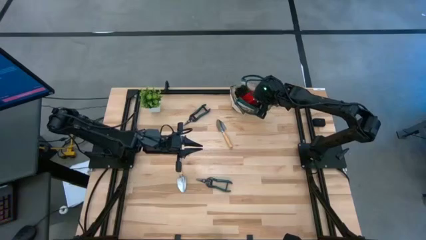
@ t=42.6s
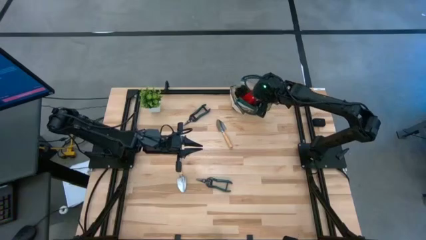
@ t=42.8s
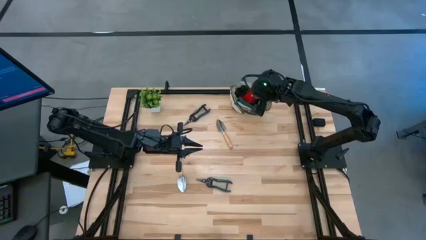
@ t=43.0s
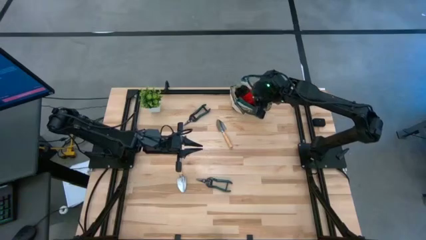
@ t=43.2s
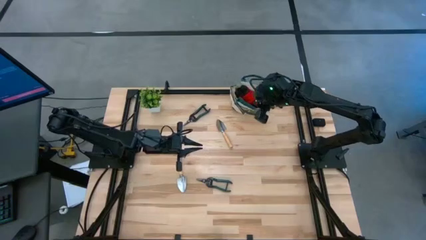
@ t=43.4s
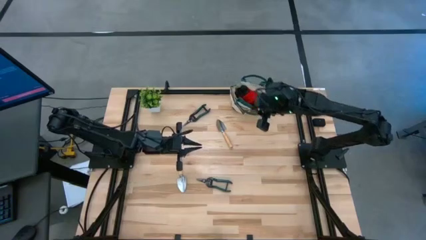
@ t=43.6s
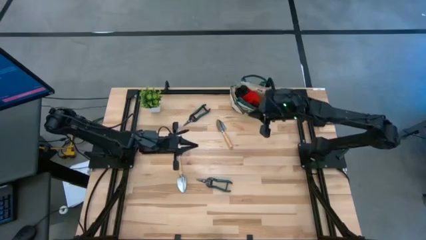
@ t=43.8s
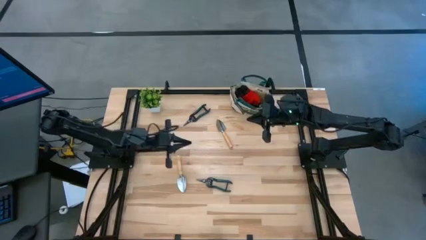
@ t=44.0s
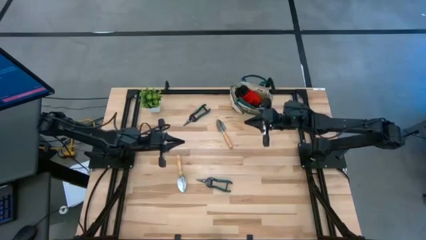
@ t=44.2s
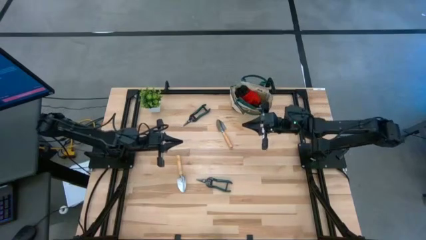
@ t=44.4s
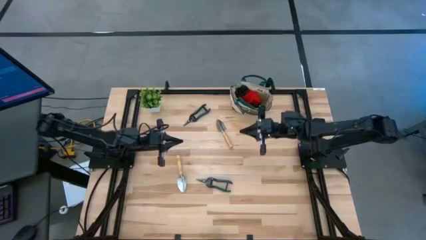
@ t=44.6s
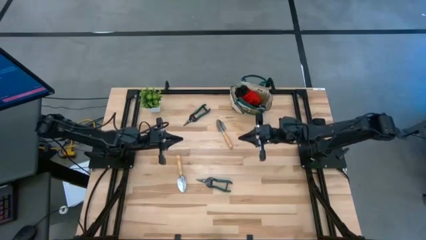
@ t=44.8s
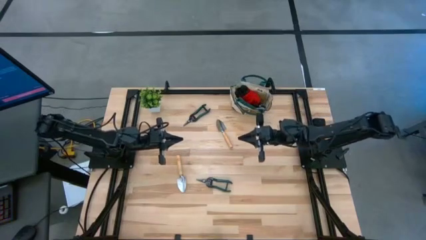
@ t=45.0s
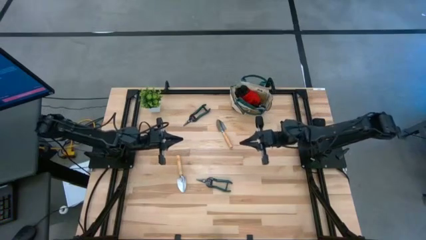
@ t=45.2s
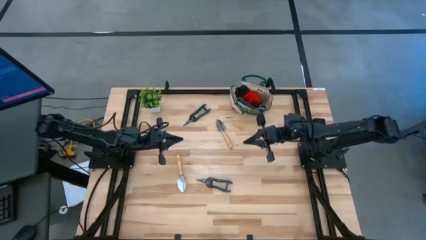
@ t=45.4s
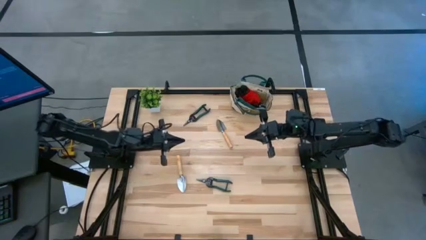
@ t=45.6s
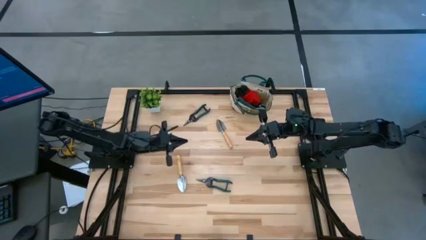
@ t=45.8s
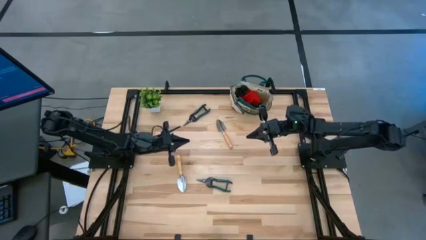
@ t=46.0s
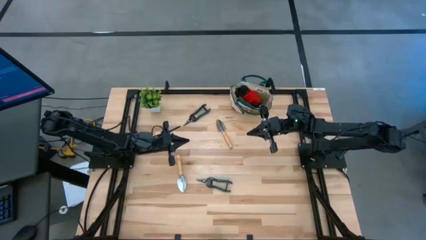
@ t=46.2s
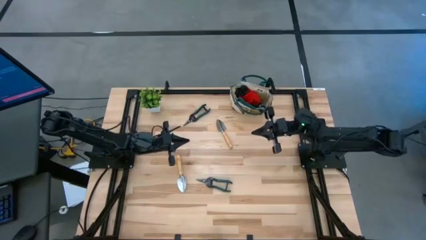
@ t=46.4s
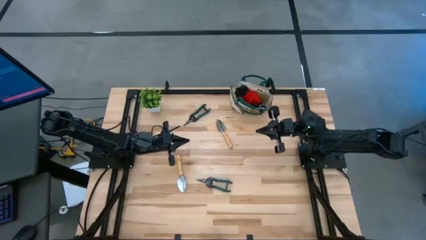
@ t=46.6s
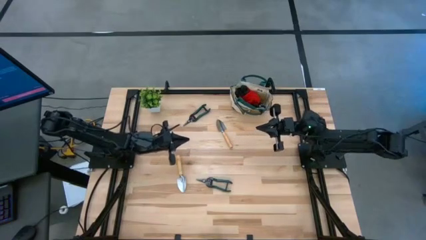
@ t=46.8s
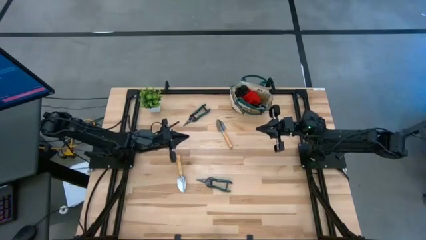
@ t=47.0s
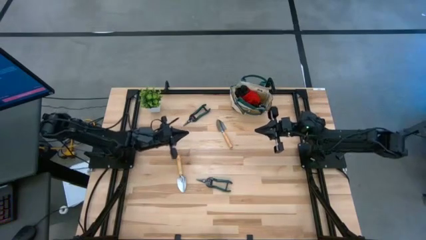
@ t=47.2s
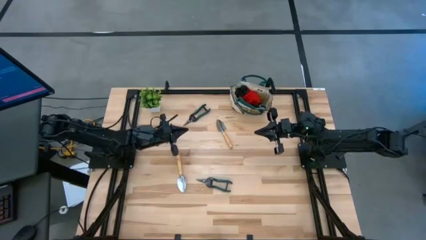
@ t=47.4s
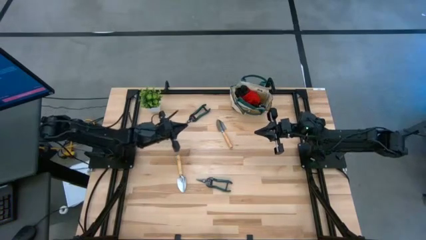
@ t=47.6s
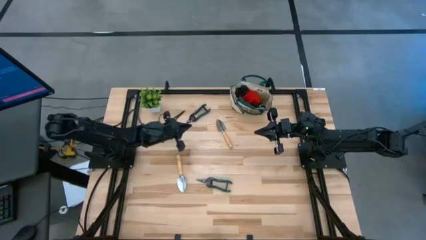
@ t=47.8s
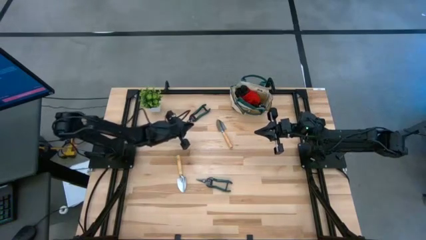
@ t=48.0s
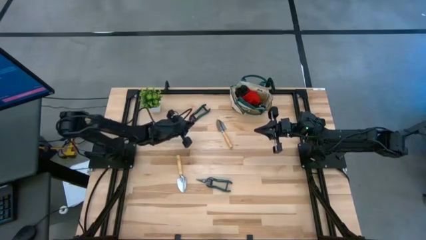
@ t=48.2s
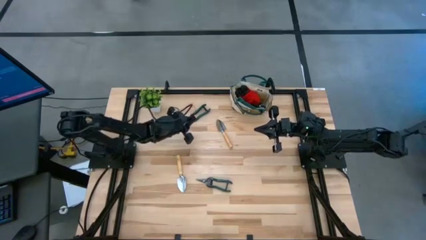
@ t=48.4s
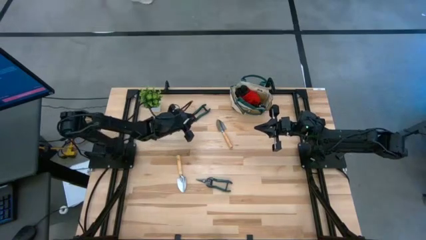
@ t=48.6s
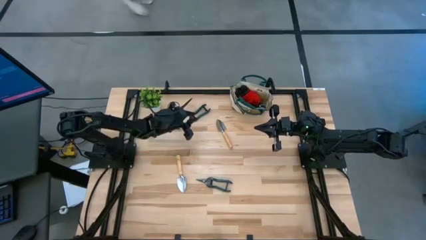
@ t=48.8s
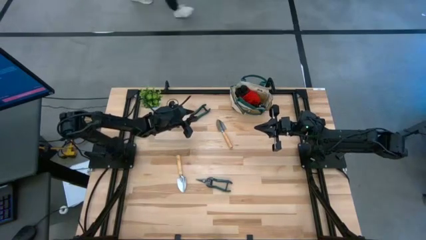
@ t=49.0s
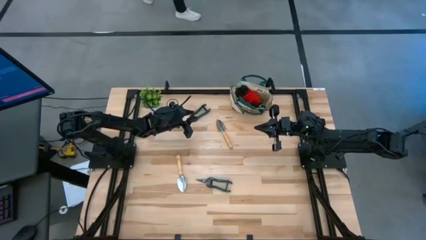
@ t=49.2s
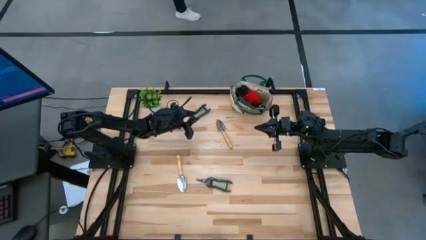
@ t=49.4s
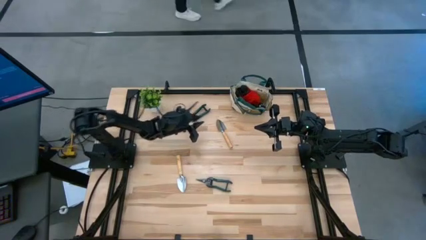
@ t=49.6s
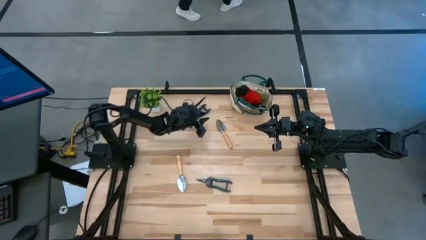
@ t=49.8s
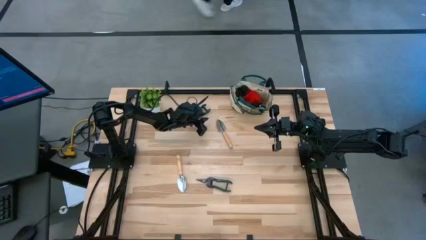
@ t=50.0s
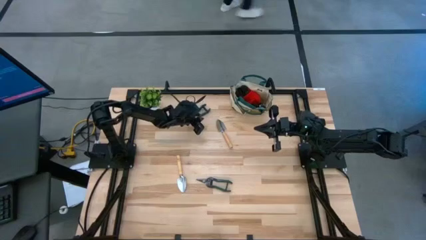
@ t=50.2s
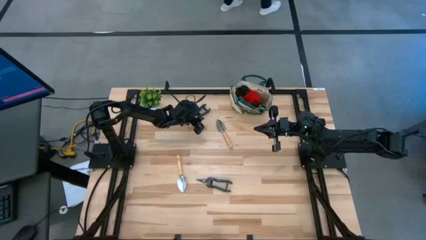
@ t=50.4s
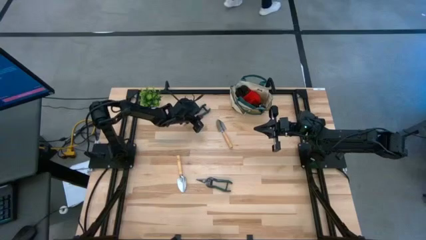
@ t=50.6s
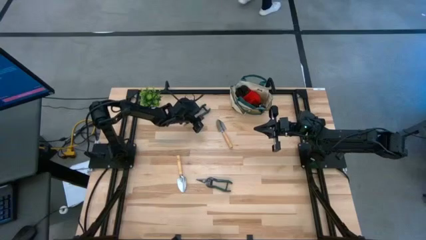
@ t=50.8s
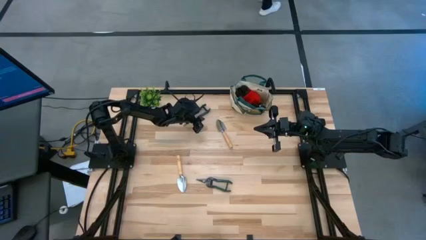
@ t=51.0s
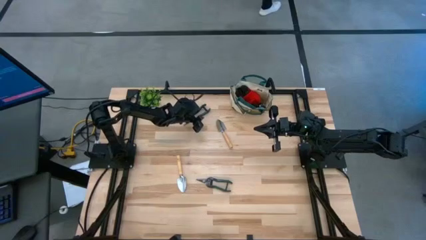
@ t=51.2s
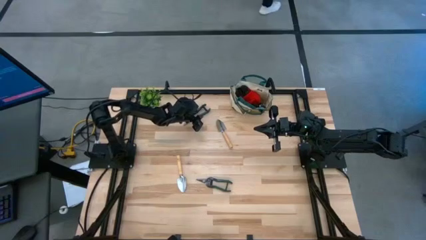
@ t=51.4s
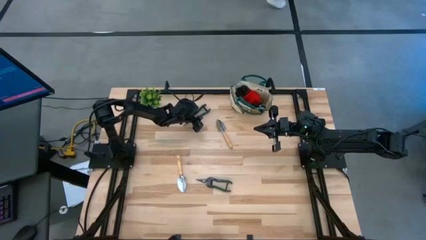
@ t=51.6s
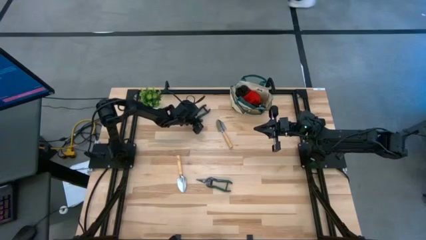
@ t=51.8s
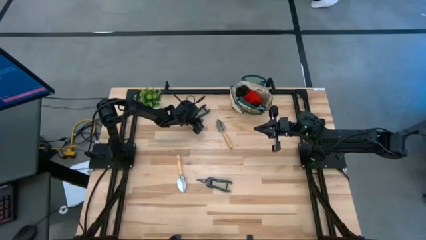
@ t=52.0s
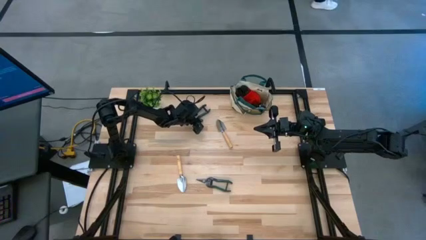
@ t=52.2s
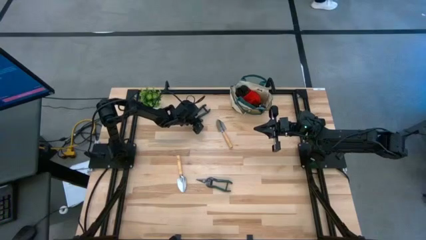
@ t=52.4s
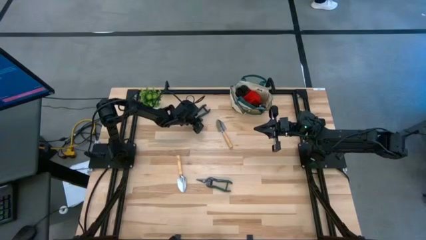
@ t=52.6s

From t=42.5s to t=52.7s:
Task: Pick & Place Garden tools in Gardening bag
Put the top green shears into the gardening bag

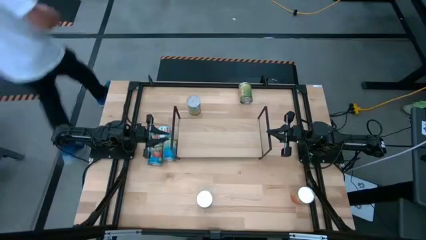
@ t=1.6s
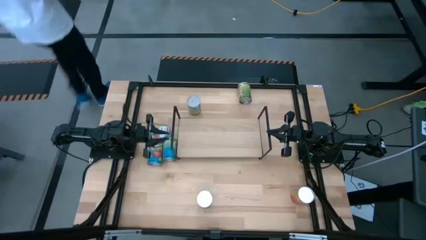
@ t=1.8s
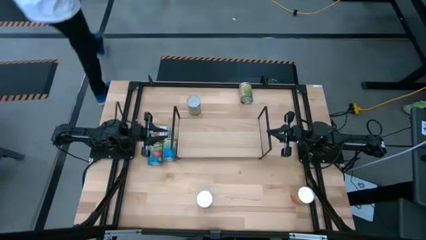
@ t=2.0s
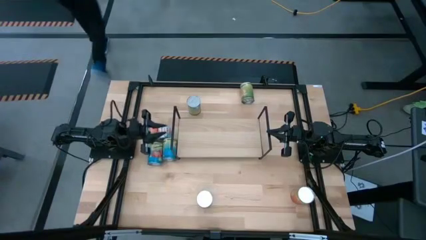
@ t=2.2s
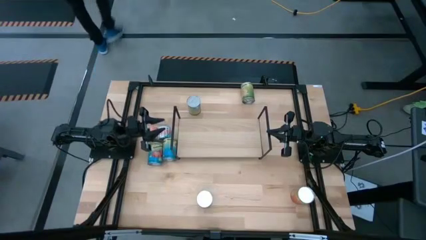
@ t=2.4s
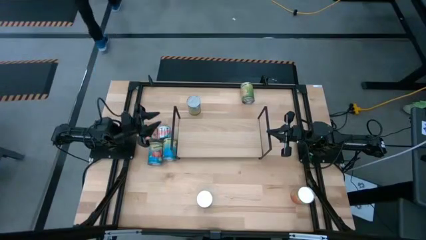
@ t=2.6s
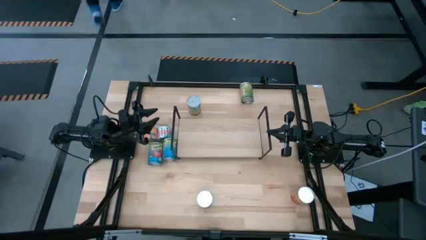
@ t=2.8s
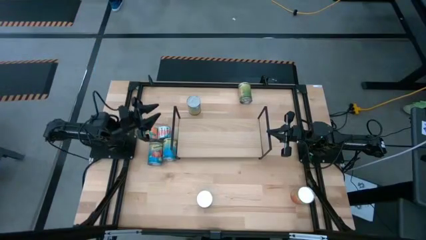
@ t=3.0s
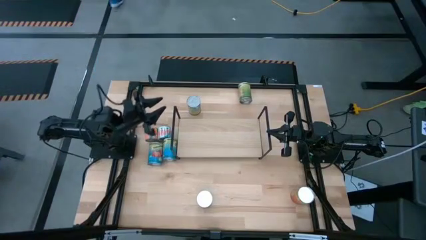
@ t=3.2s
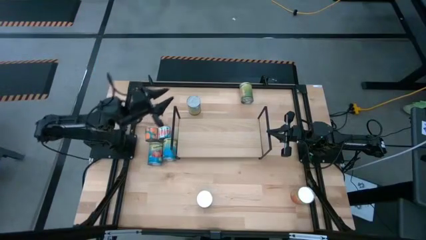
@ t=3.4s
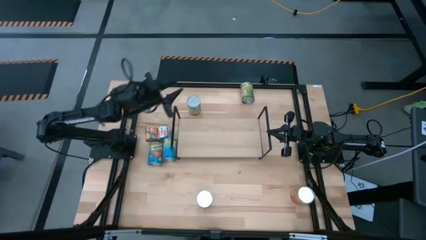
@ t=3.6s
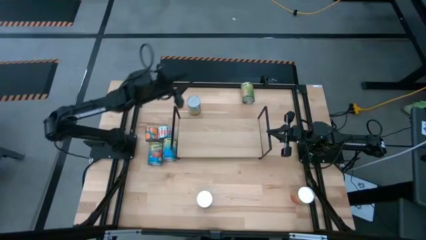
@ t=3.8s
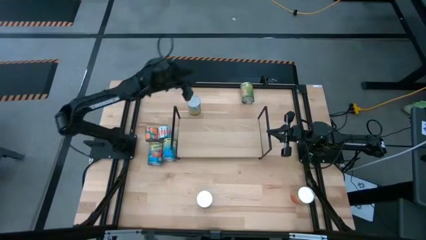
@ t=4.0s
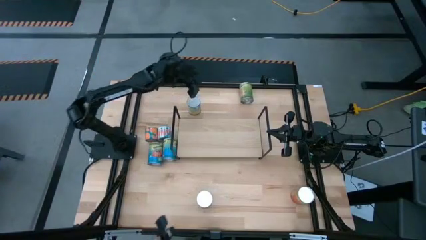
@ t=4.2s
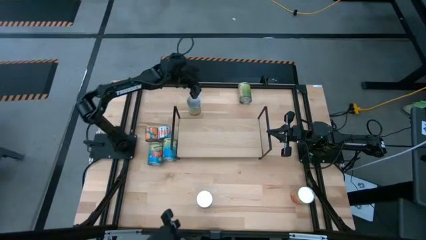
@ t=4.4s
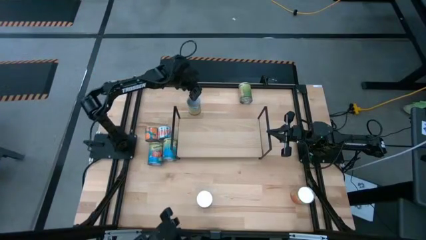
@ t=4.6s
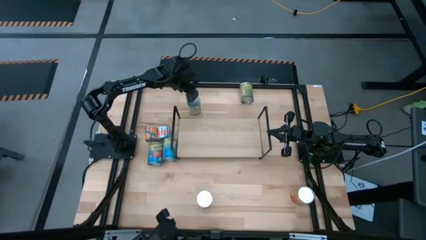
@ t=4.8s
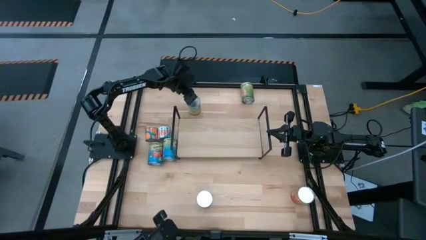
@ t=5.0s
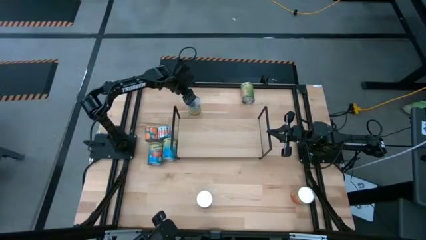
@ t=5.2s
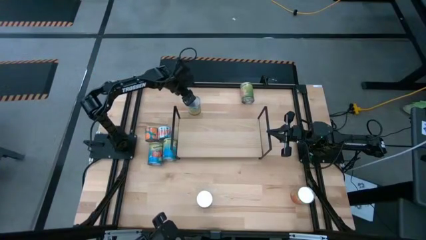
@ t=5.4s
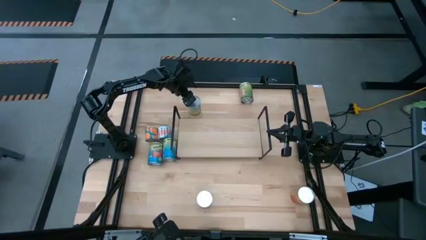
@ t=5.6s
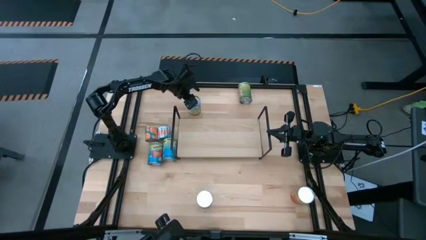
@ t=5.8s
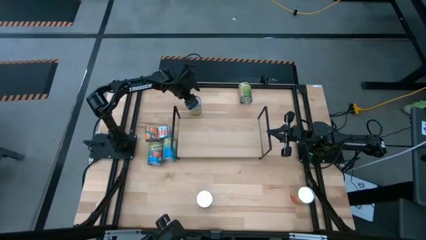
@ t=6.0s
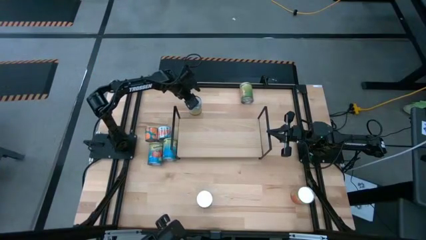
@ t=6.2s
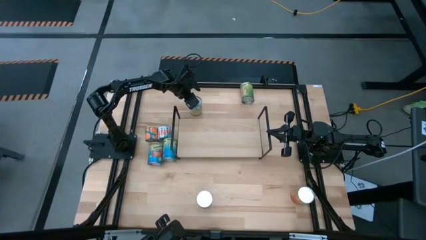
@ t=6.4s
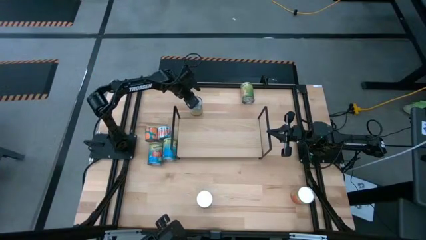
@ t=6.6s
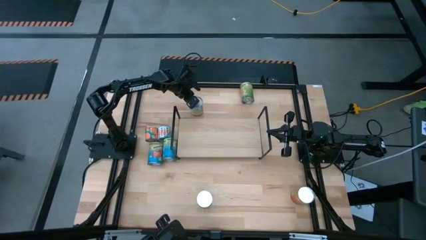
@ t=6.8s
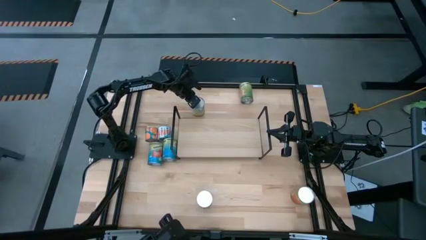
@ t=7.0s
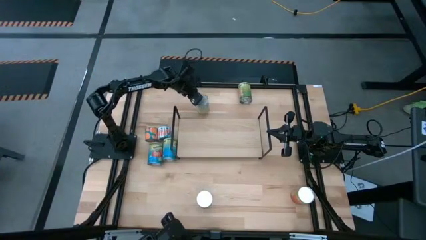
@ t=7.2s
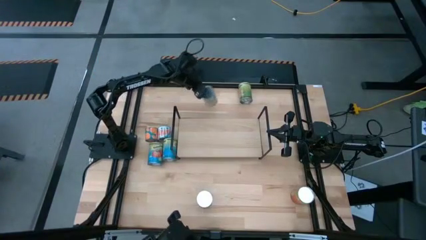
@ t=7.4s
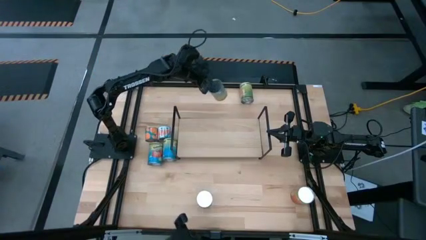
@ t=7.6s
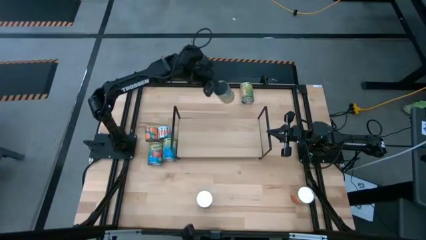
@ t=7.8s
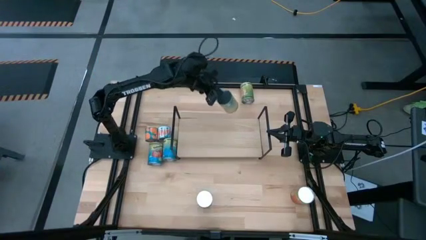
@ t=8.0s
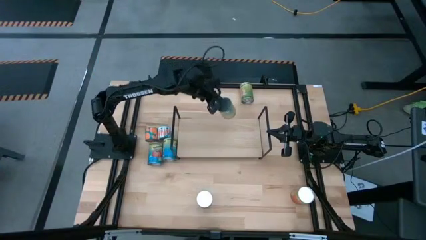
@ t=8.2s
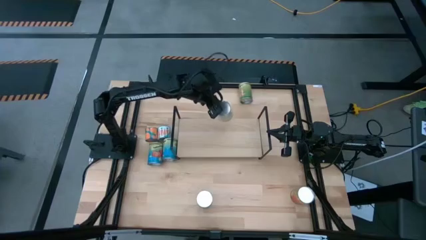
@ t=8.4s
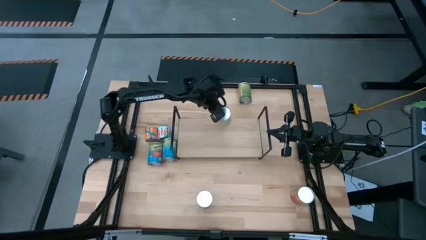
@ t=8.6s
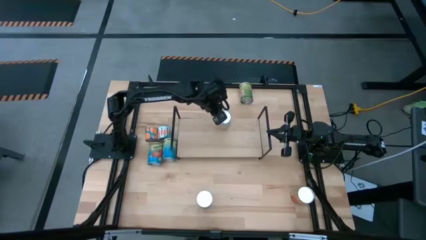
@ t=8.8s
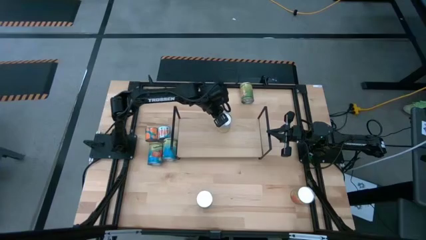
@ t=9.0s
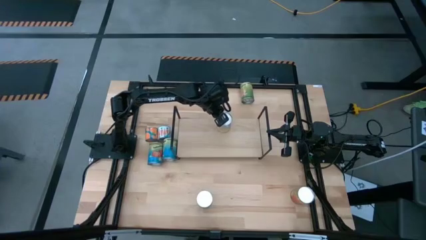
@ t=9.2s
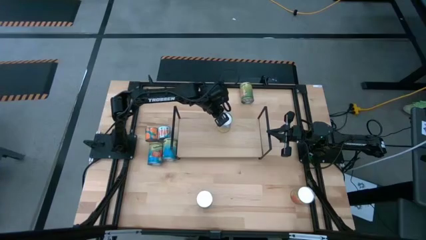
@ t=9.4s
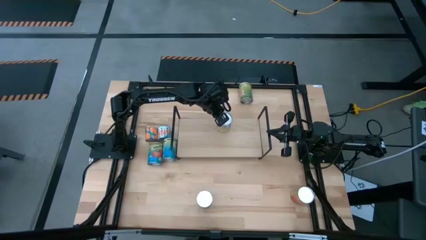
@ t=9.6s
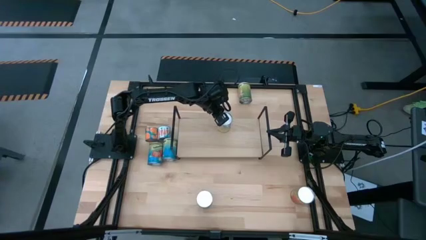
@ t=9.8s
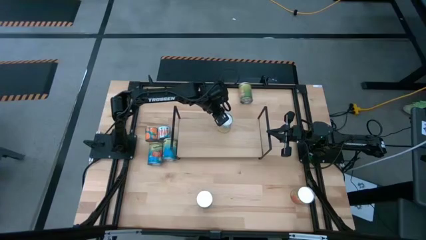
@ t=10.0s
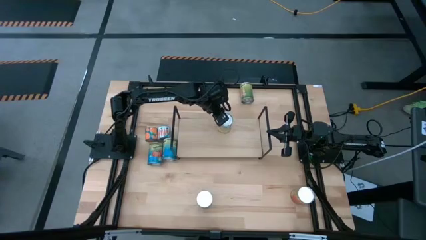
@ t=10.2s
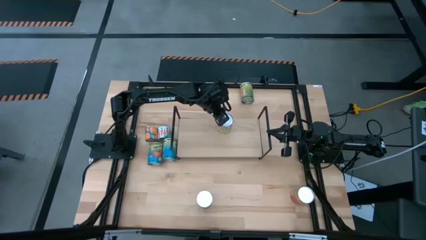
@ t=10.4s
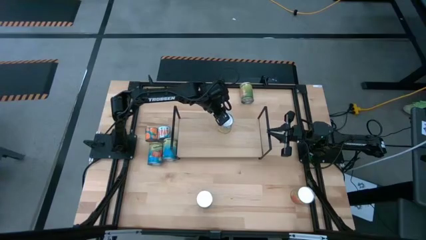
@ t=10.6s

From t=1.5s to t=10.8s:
Task: Pick and place cans onto a shelf
Put the canned carrots on the shelf
